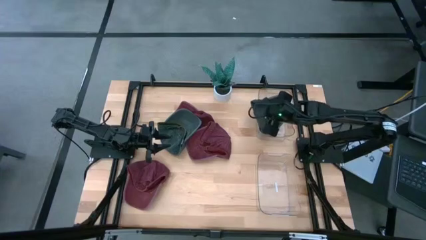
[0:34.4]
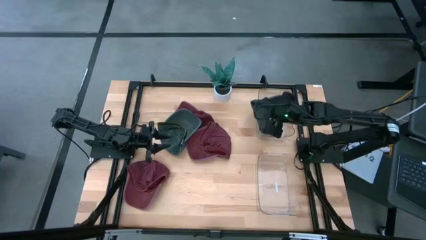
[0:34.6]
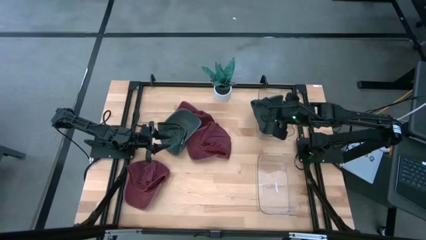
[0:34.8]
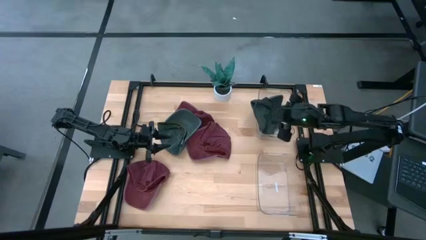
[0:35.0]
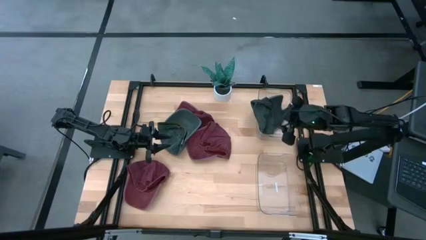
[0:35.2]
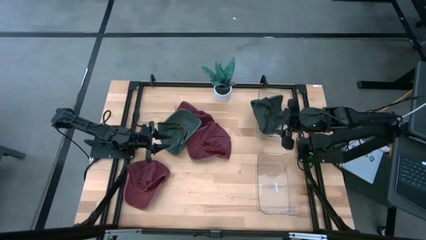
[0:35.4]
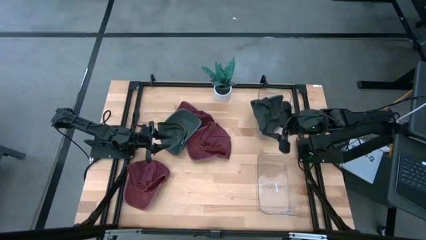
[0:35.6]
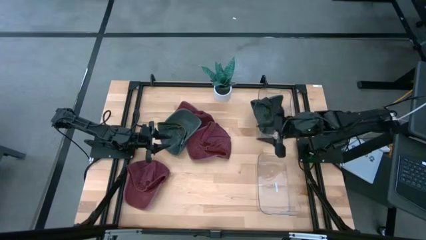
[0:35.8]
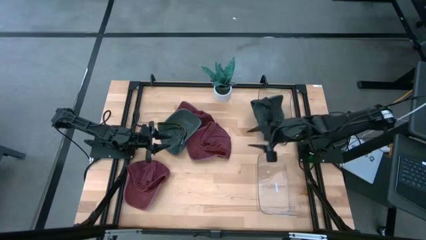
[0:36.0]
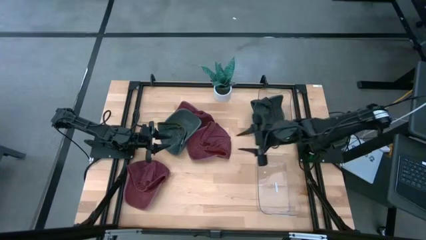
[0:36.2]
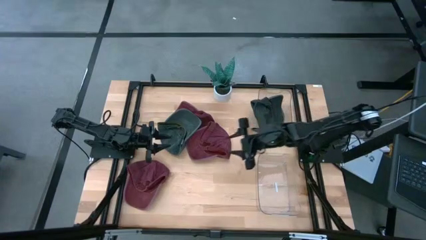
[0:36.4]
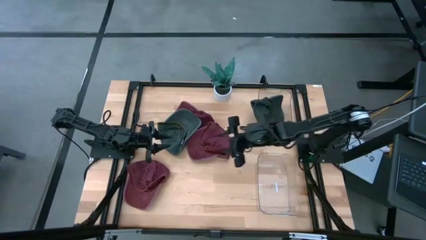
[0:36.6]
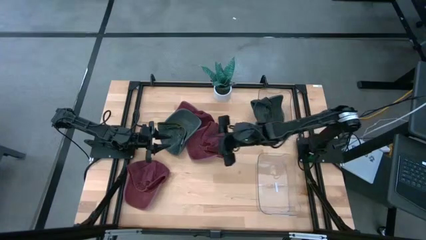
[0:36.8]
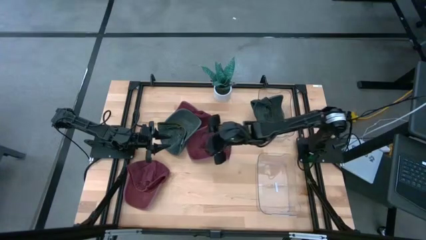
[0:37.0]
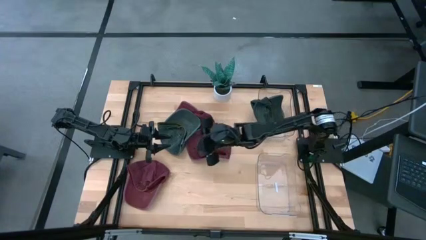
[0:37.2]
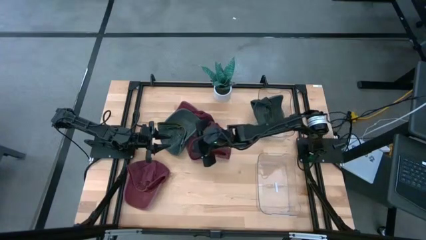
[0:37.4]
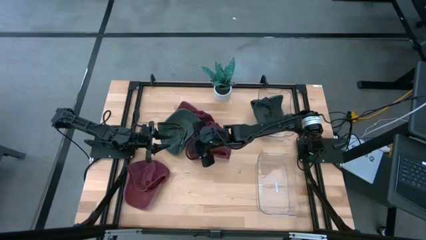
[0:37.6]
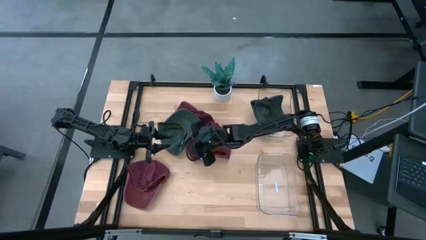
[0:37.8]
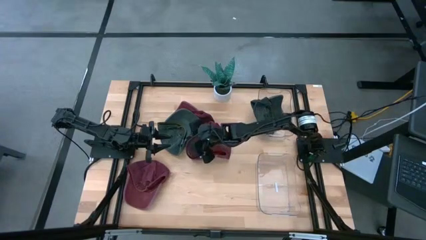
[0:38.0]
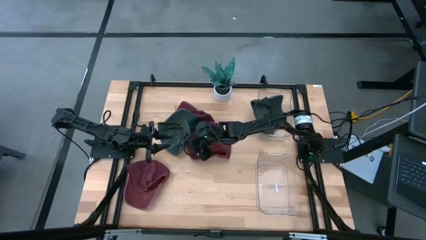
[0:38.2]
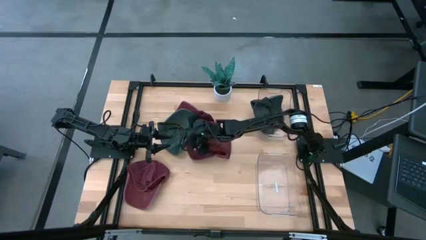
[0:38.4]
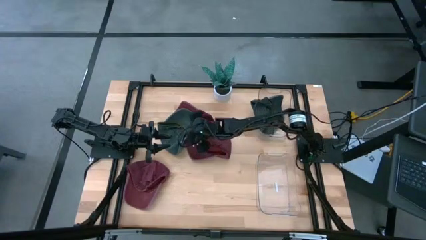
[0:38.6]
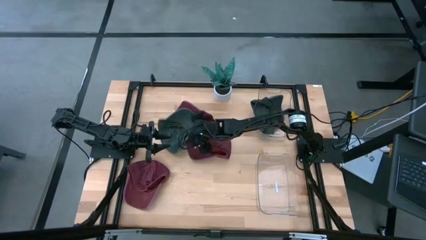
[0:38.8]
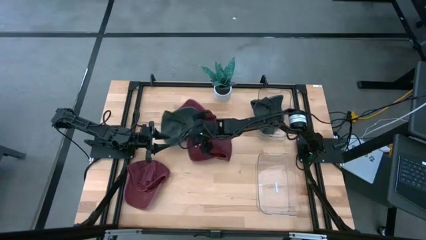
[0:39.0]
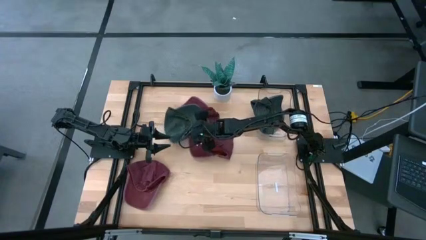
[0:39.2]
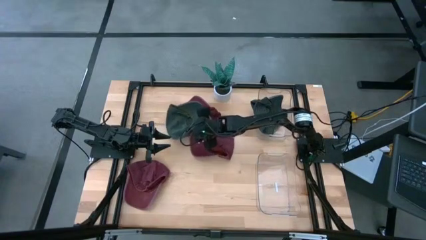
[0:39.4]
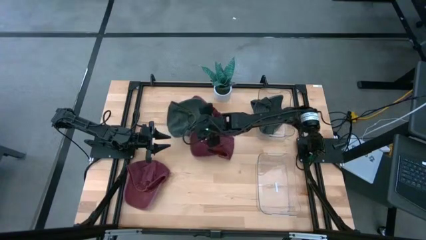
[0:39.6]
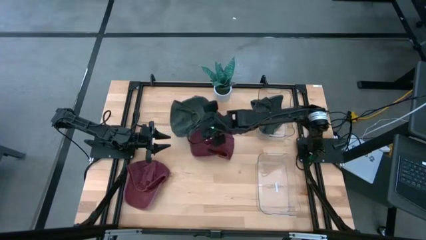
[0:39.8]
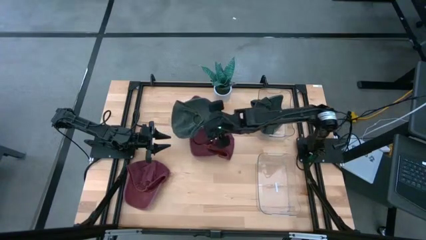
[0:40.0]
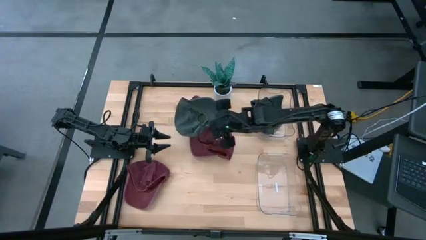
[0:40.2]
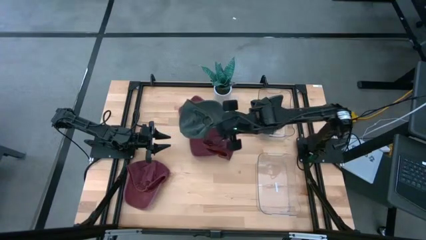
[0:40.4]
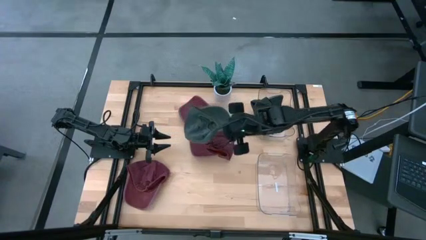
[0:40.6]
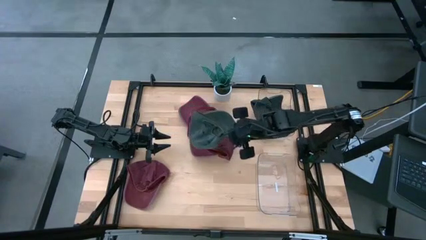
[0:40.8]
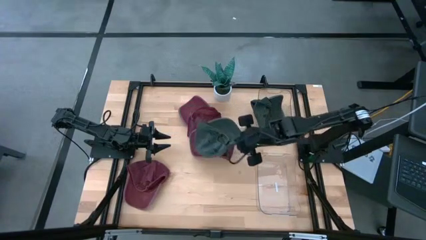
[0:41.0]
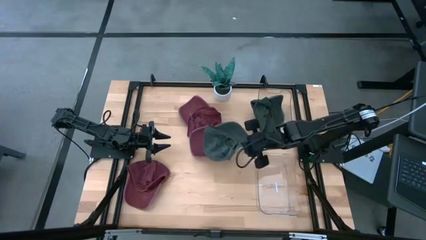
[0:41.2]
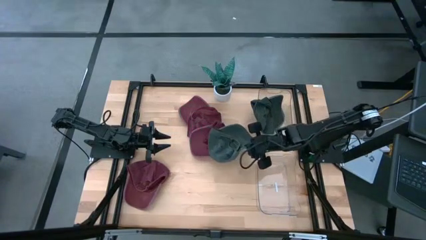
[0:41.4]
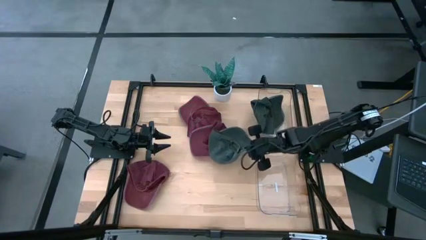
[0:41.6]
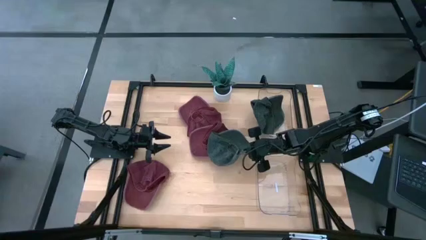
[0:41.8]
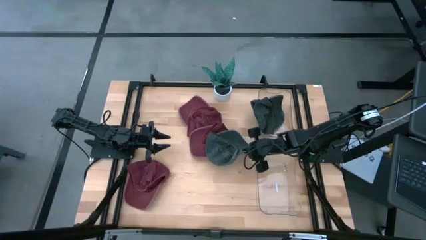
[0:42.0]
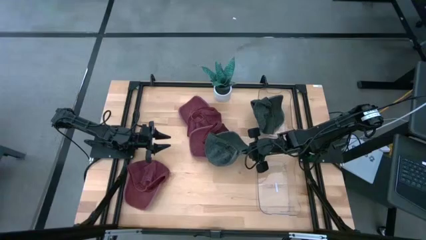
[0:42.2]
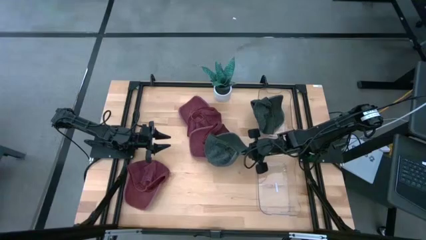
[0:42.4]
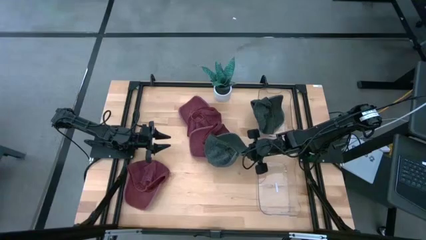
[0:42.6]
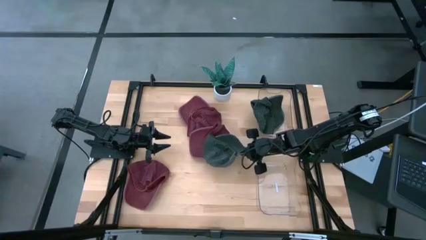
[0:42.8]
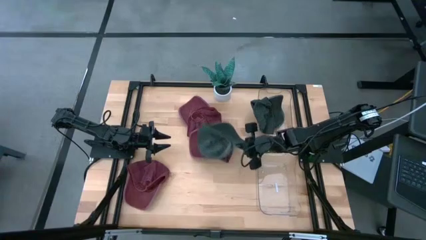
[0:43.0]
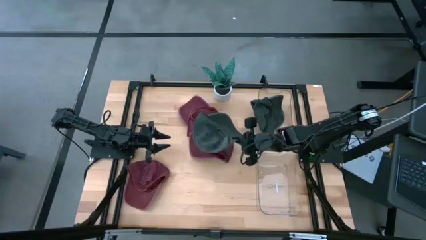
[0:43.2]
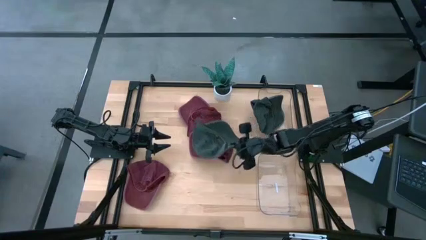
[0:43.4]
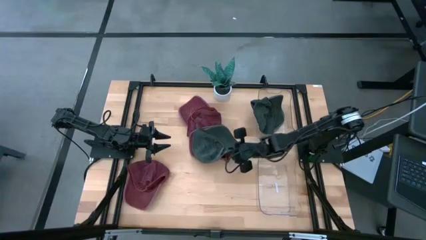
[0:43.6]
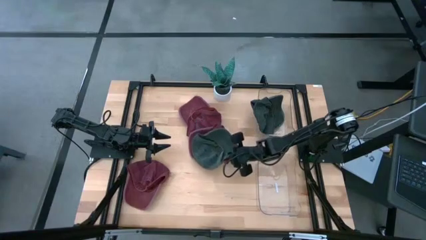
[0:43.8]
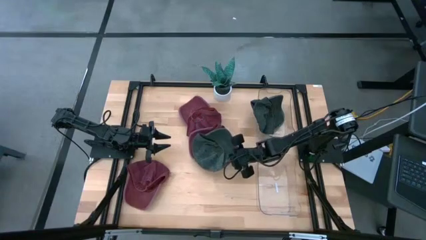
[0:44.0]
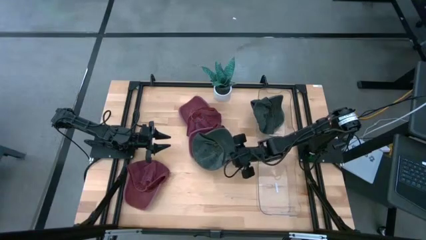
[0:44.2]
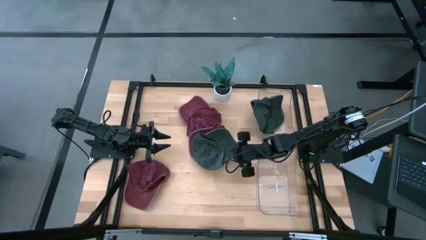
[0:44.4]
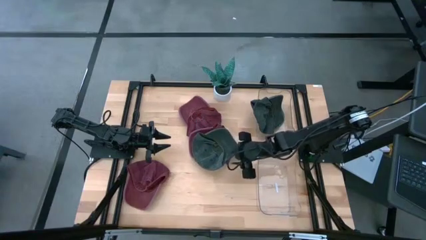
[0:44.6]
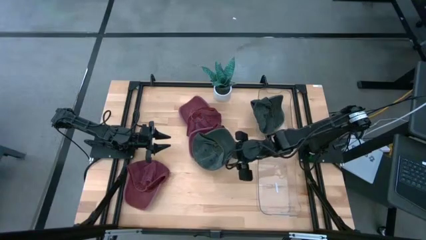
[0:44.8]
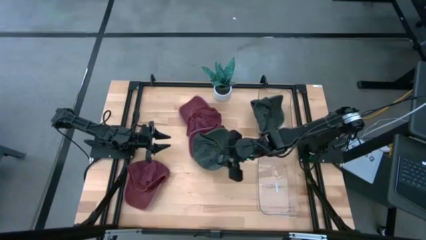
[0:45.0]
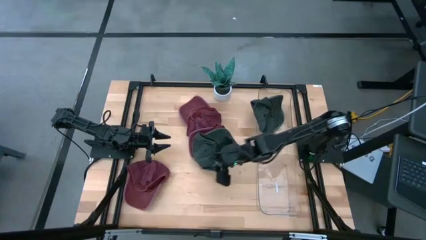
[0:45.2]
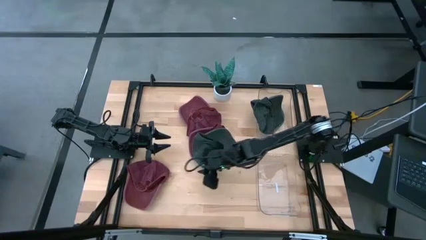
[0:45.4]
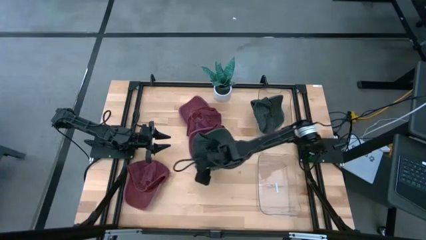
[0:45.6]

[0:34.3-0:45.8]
Task: Pick & Place hat
Put the black cap into the top transparent bin
